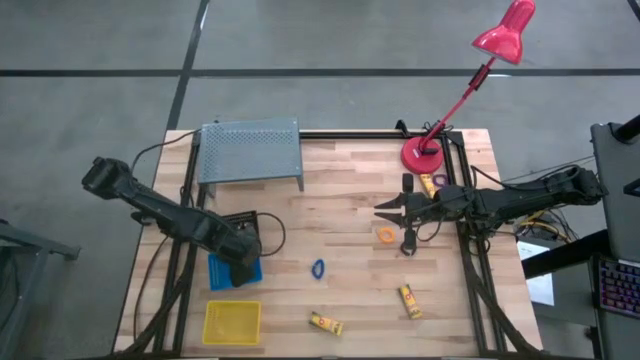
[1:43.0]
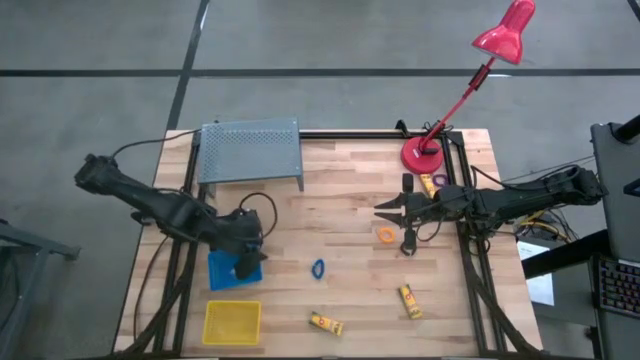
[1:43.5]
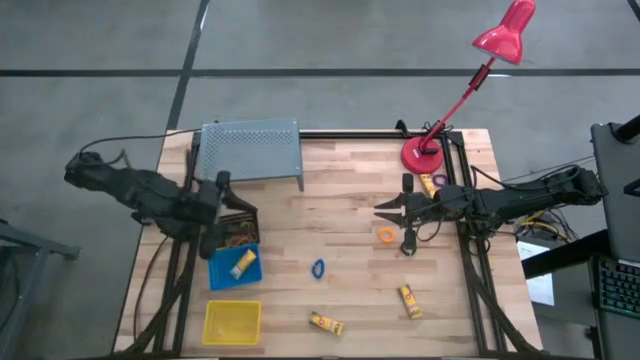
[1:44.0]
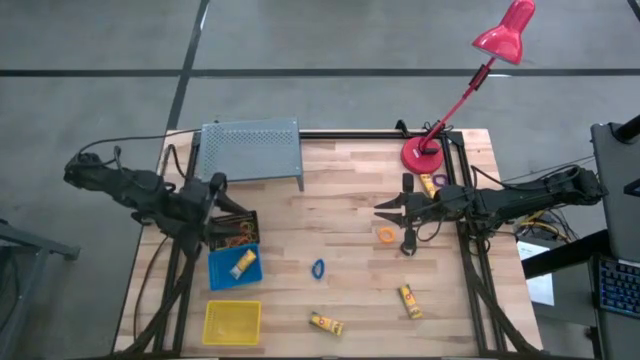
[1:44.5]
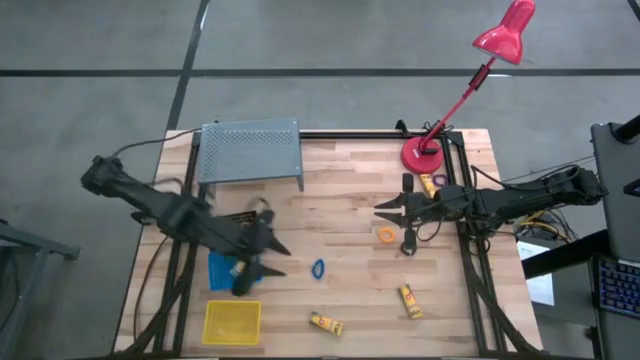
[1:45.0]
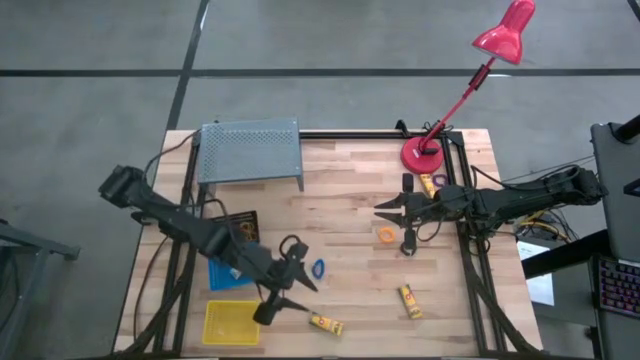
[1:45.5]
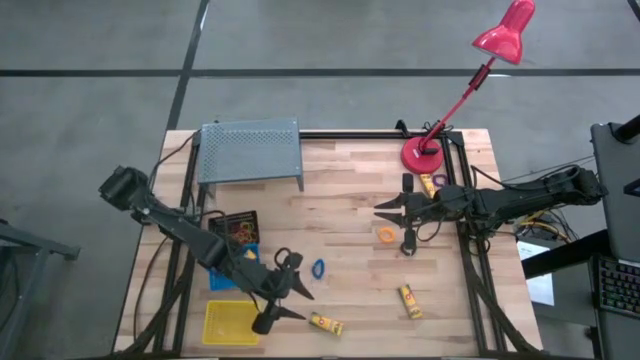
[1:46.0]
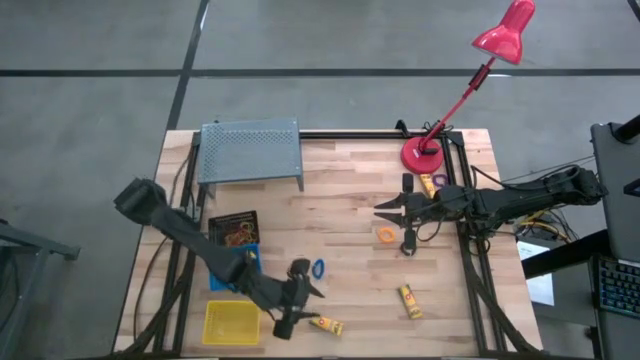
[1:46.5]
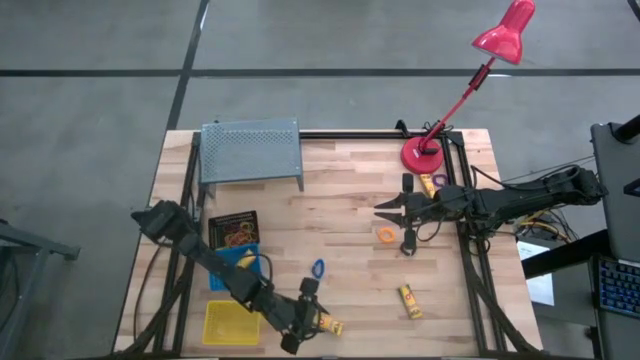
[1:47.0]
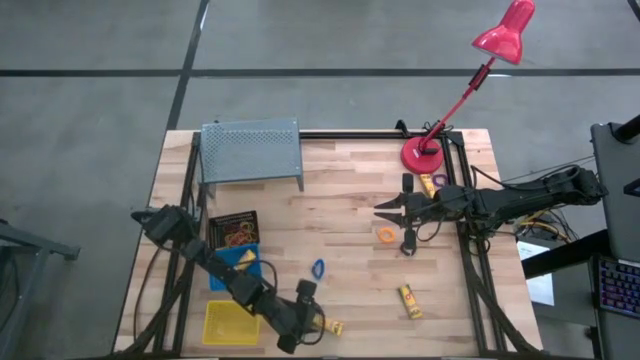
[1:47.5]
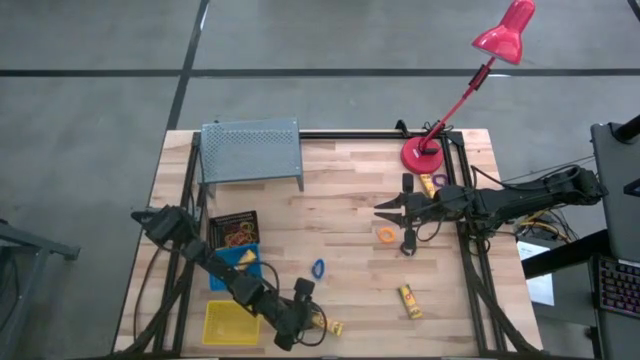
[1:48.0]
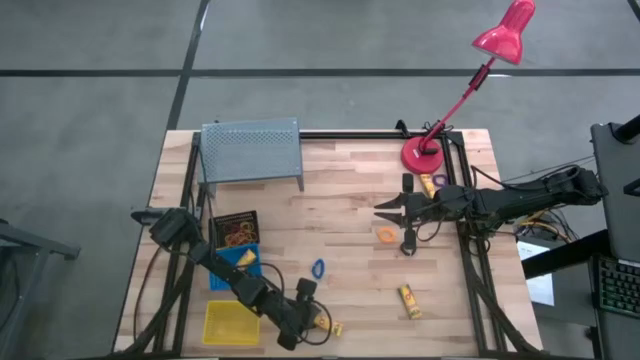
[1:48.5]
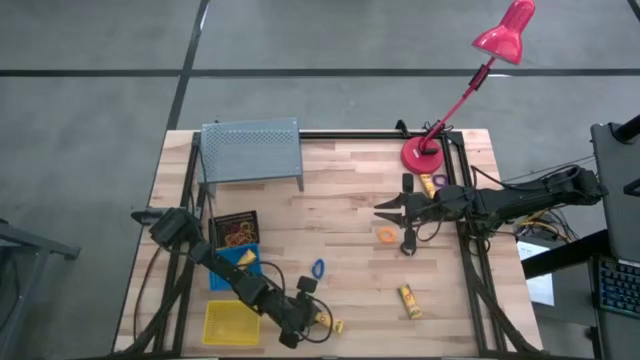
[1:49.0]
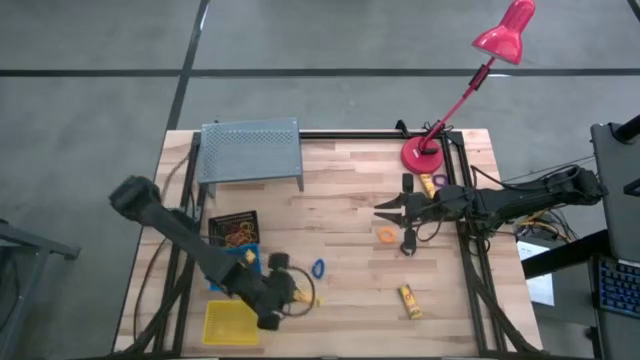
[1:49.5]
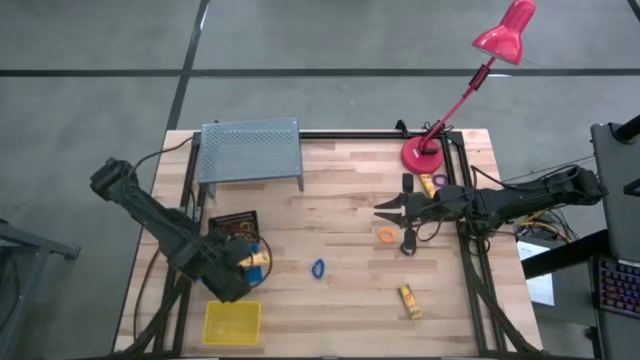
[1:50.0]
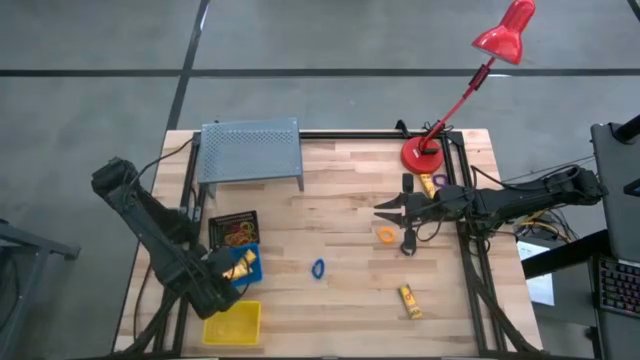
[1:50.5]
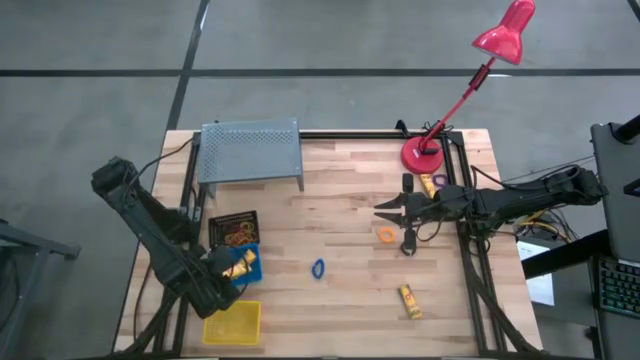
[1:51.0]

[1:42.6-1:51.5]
Task: Pick & Place Office Desk Supplies
Put the yellow crayon box in the blue bin

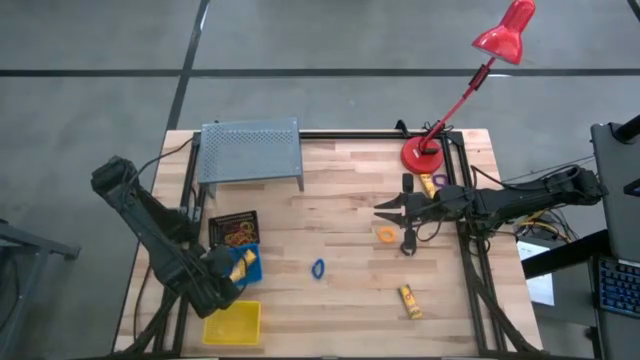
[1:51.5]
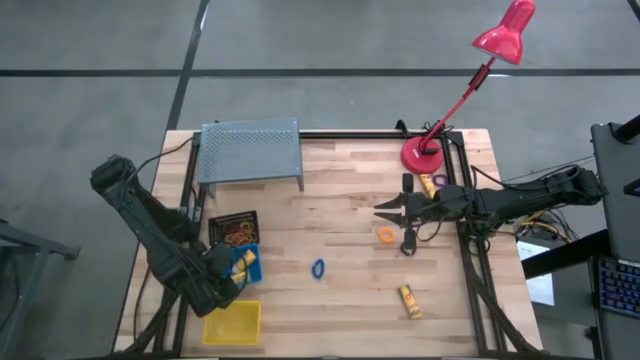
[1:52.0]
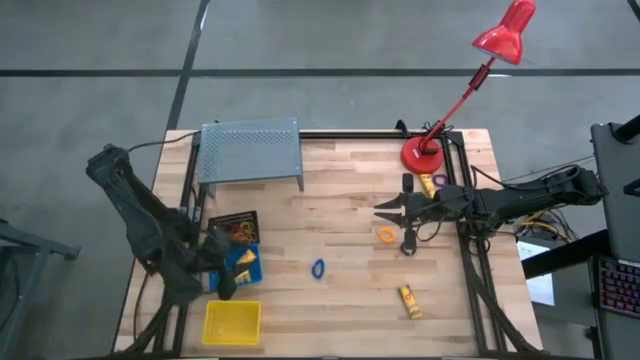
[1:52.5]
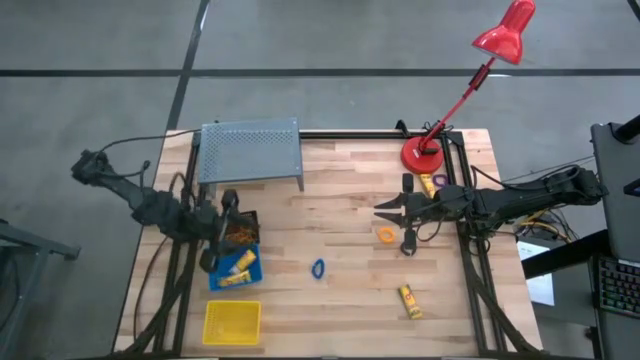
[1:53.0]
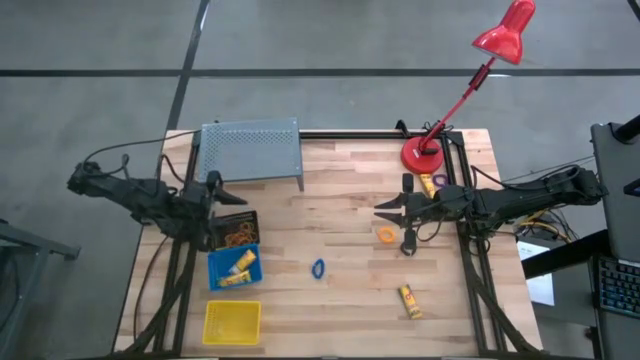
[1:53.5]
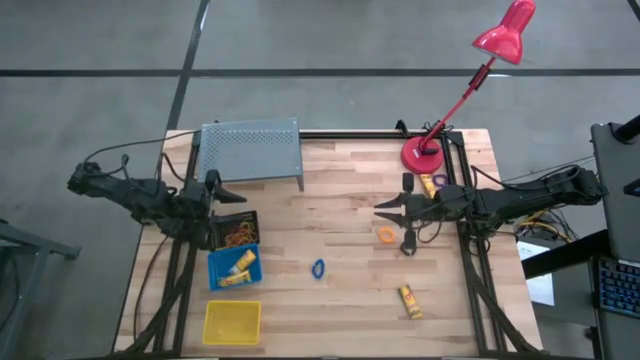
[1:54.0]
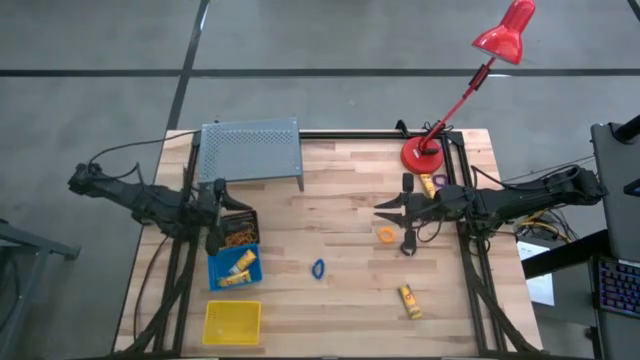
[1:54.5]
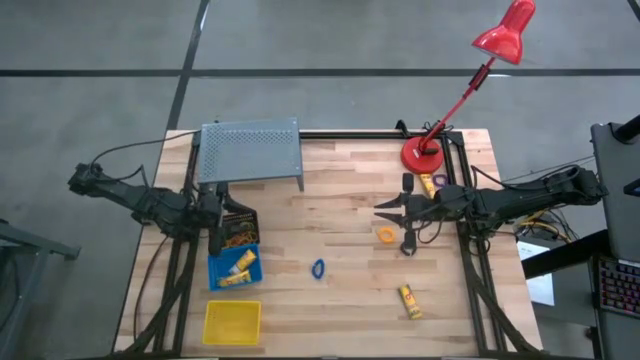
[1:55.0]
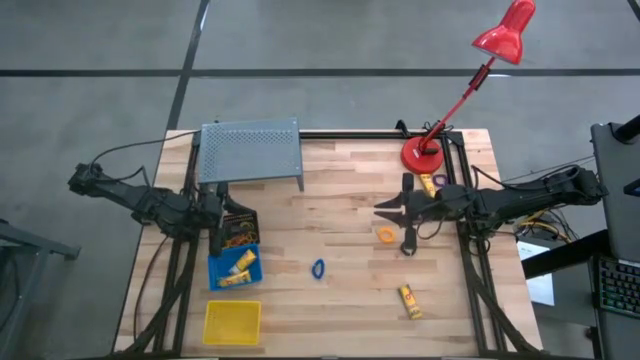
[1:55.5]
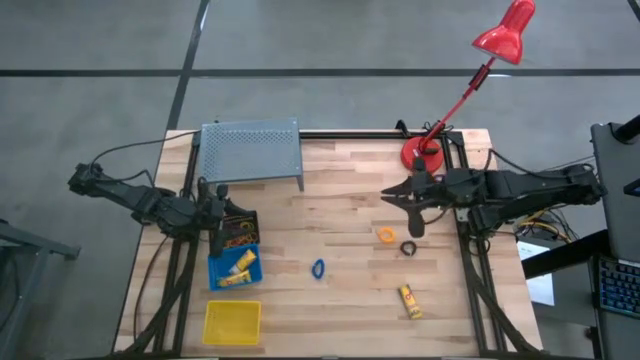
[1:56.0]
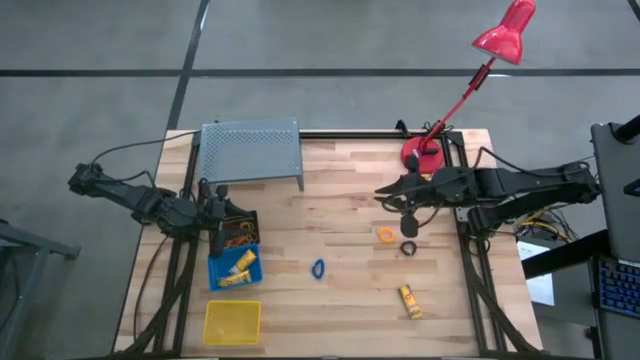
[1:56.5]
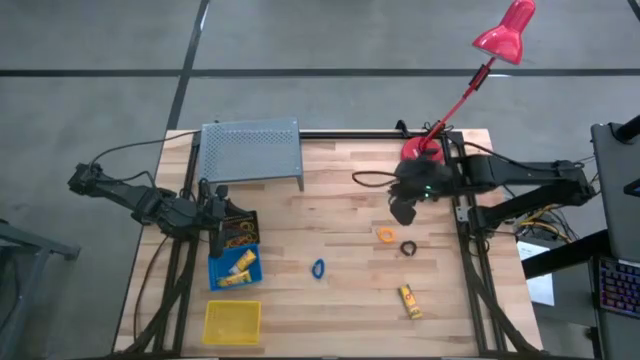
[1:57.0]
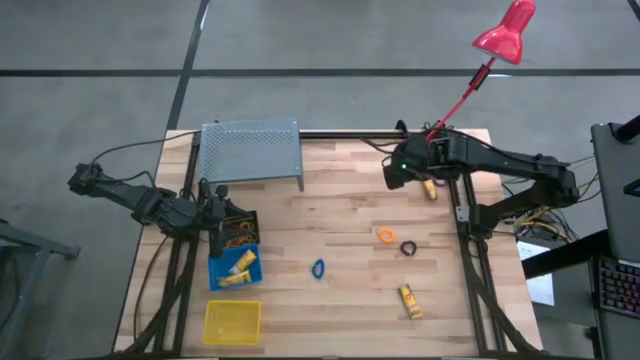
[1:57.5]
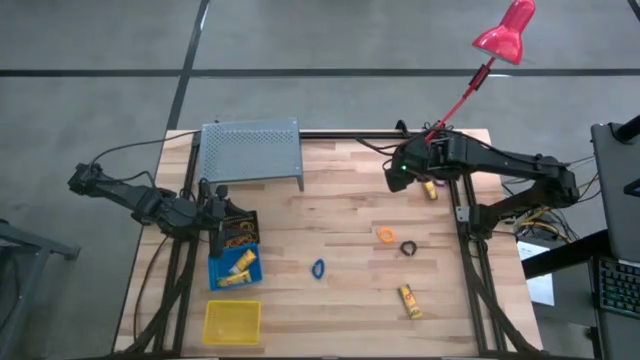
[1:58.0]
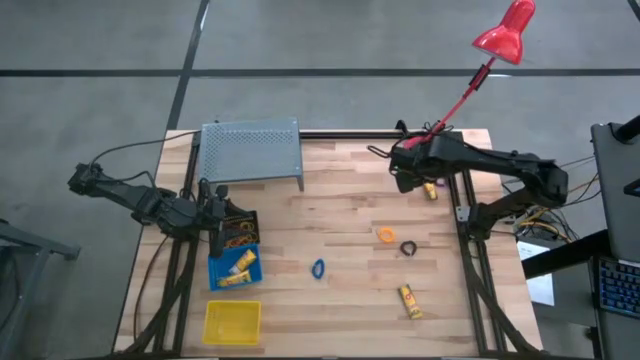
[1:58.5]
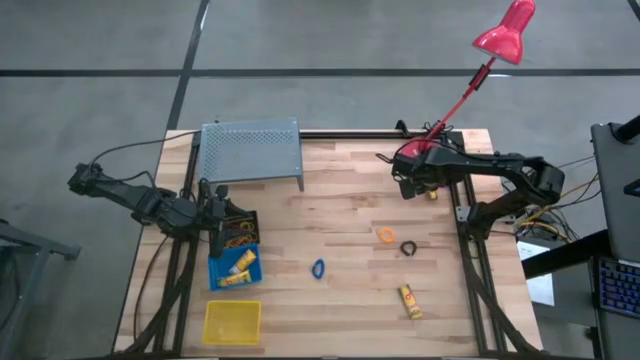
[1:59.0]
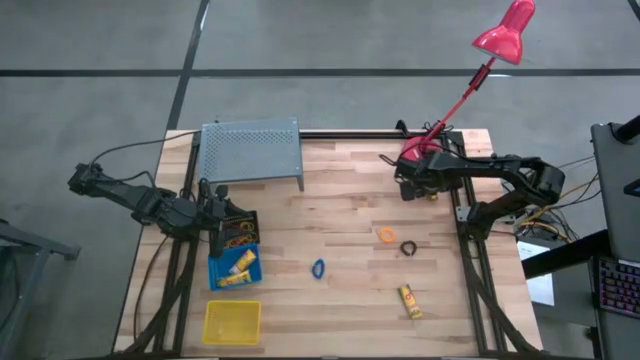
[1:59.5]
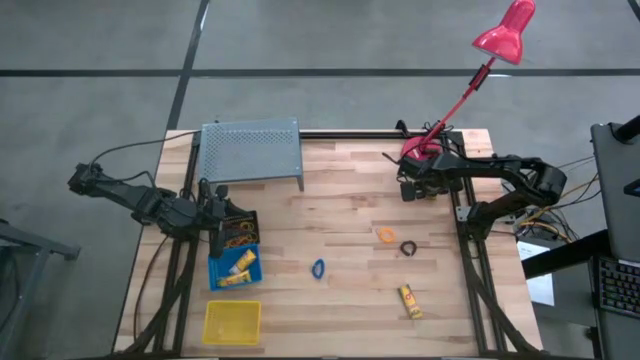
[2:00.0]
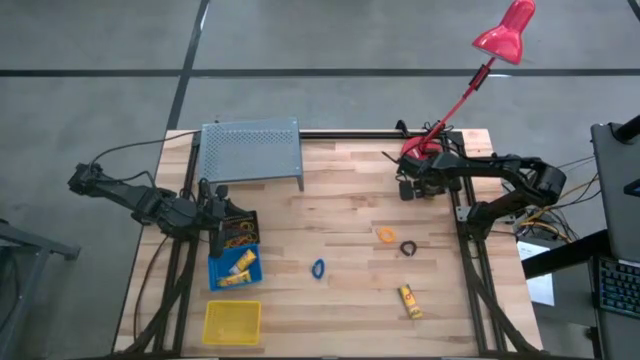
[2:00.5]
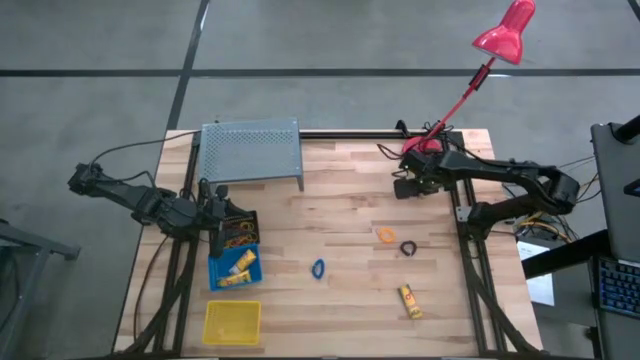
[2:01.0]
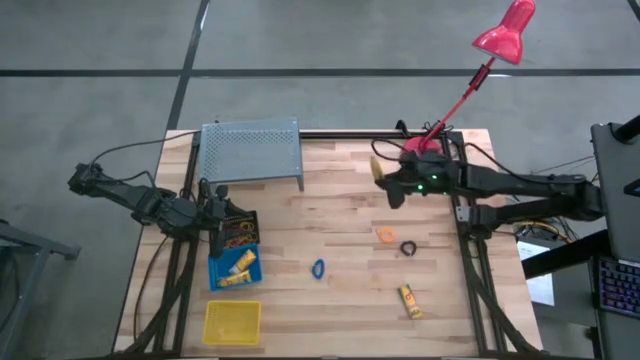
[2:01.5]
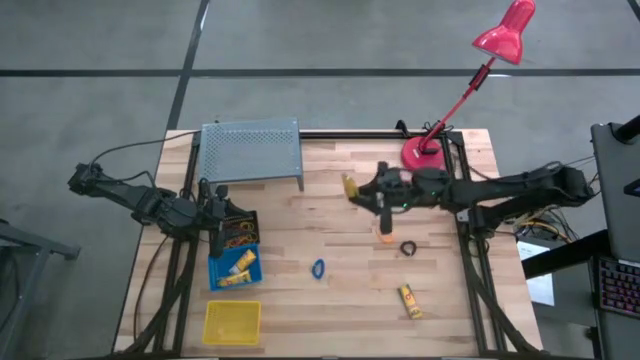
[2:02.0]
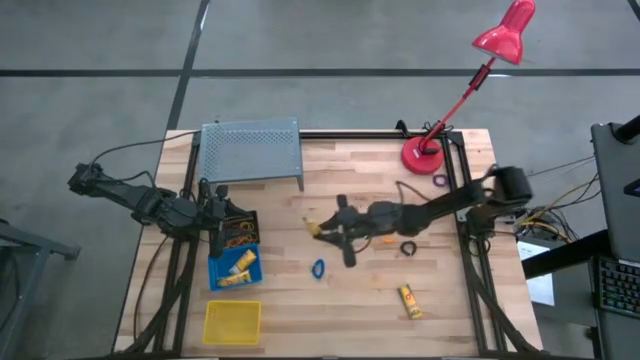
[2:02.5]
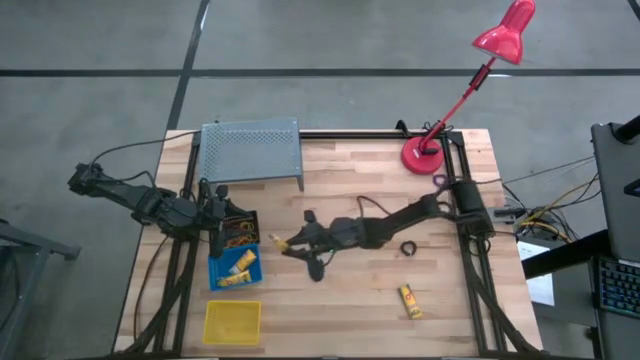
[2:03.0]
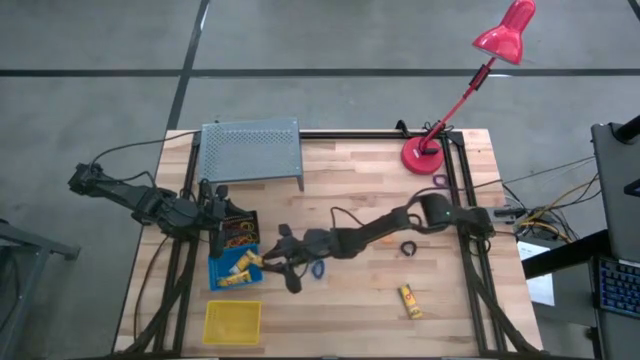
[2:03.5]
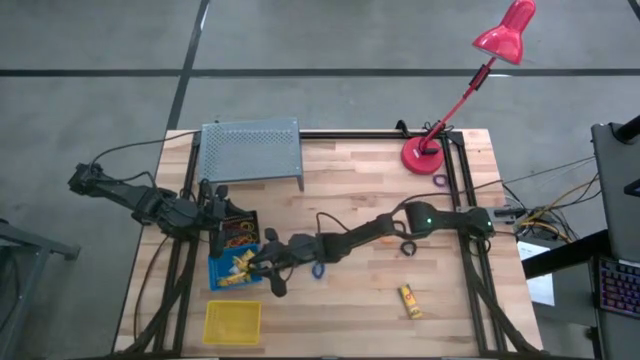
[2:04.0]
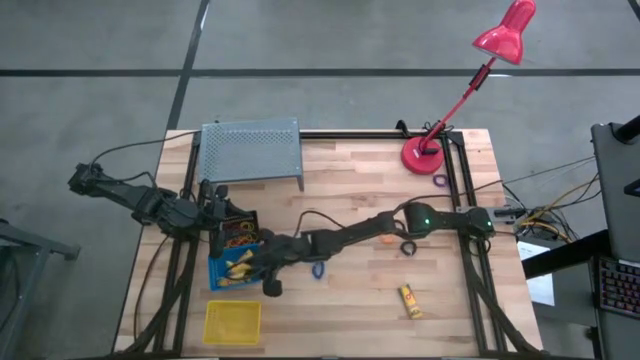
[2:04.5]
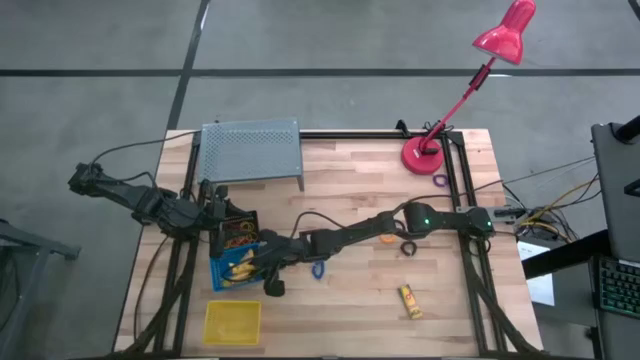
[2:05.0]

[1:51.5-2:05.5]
Put the yellow crayon box in the blue bin
